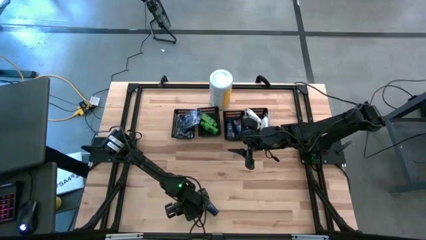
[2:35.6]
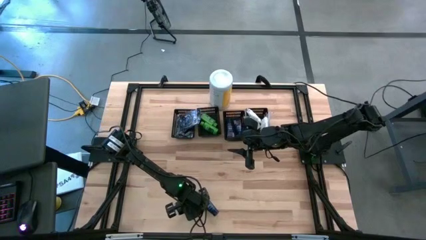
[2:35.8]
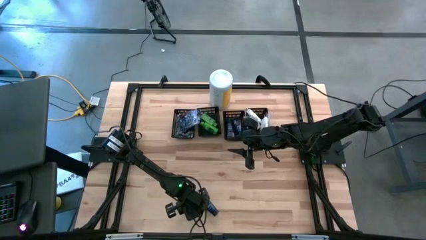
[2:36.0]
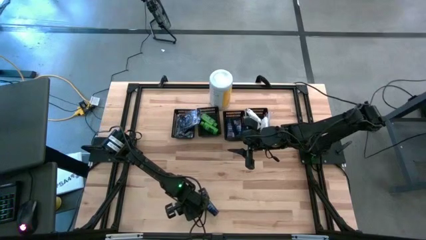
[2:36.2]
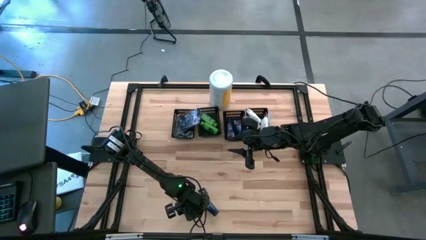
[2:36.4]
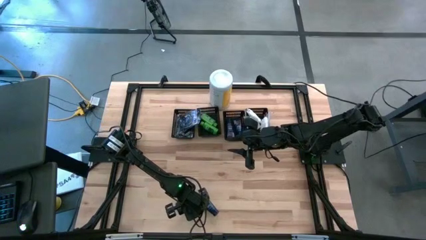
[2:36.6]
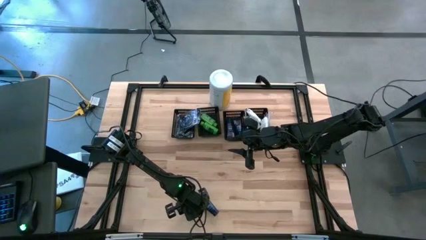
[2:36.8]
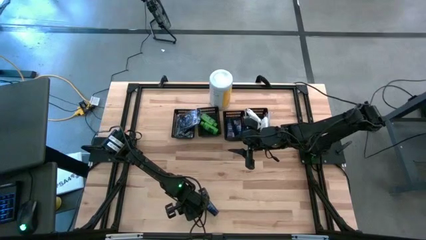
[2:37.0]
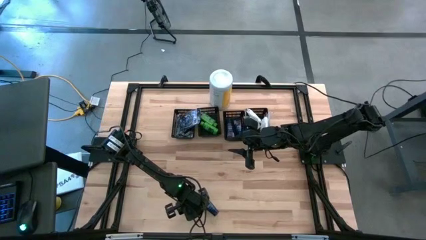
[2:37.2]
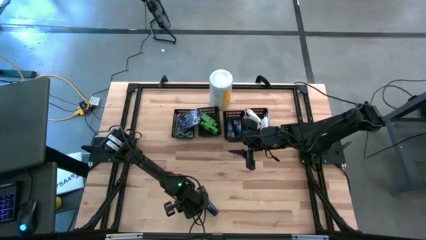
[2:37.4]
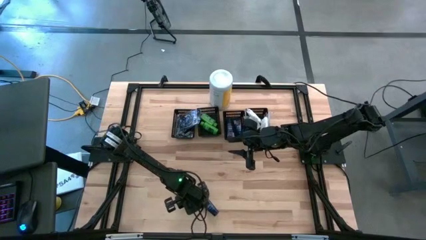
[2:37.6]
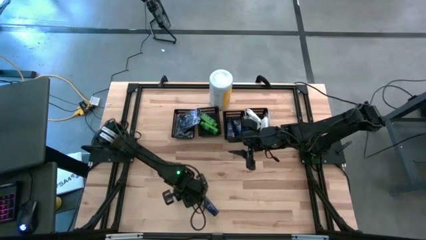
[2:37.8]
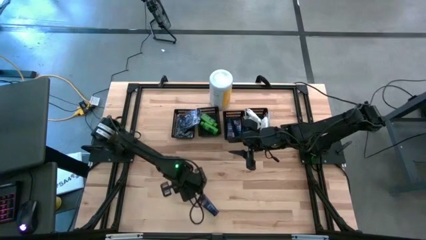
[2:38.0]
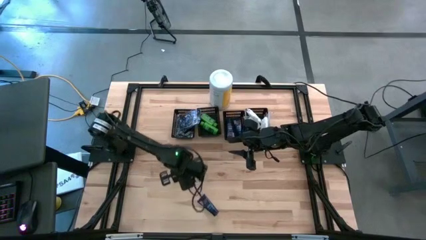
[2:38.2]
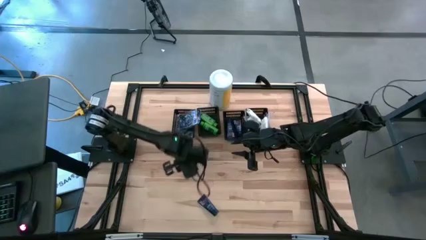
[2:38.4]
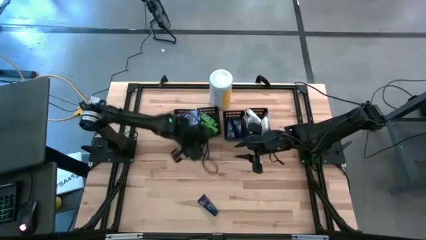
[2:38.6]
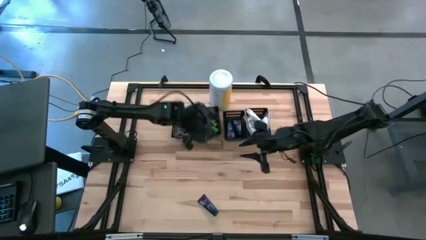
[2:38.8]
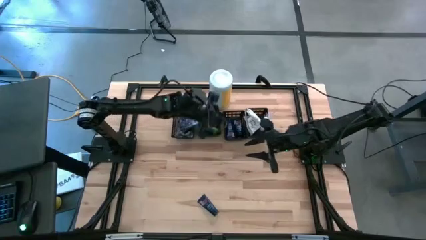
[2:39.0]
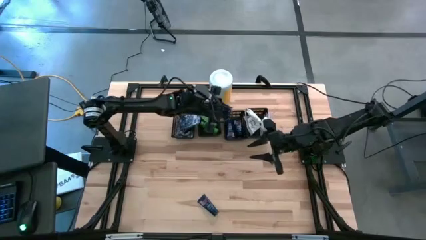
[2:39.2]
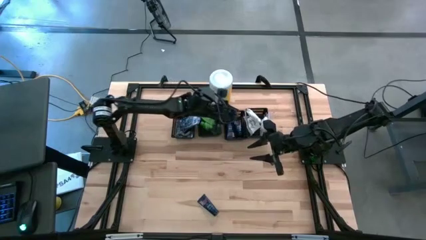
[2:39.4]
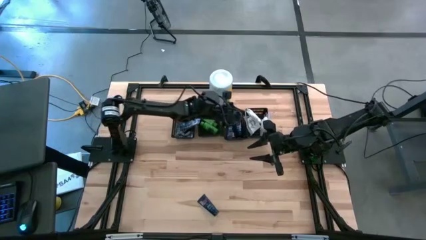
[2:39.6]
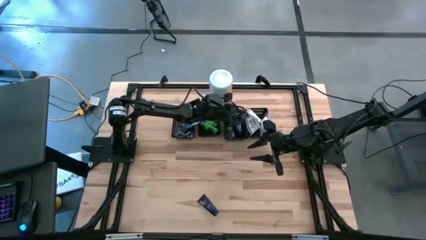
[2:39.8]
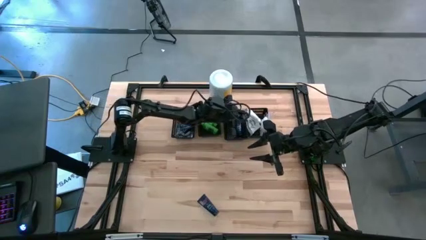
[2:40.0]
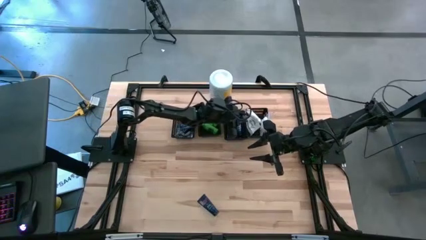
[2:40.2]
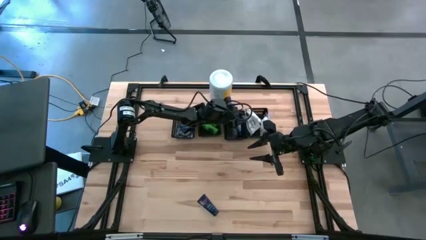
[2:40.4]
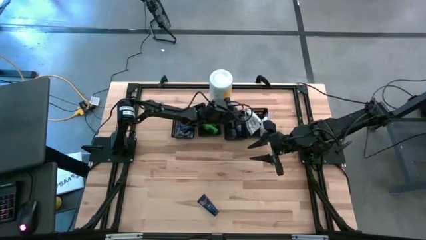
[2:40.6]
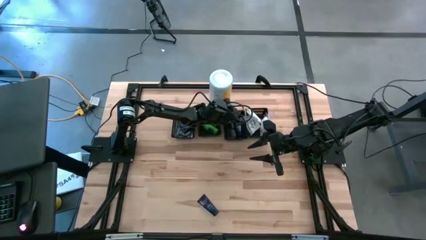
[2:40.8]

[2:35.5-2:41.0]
Task: Pick & Place Travel size toiletries
Put the left shave cream into the middle right black bin

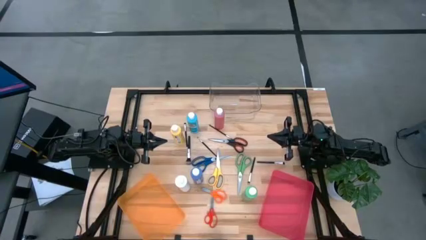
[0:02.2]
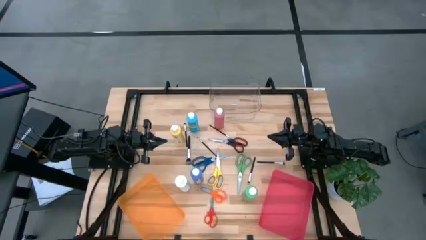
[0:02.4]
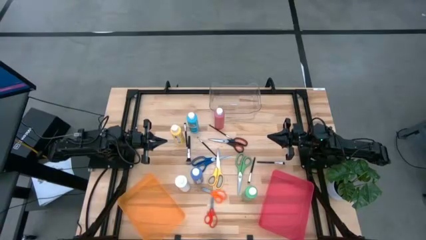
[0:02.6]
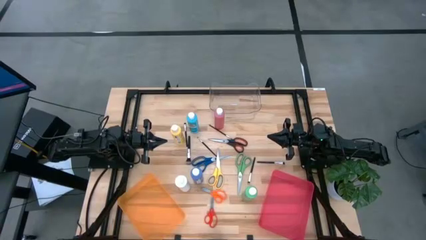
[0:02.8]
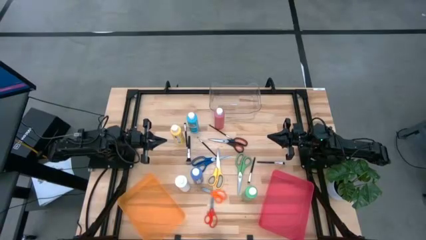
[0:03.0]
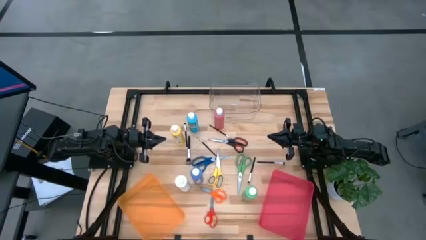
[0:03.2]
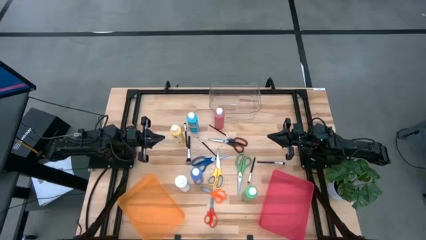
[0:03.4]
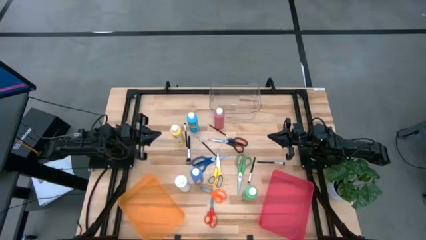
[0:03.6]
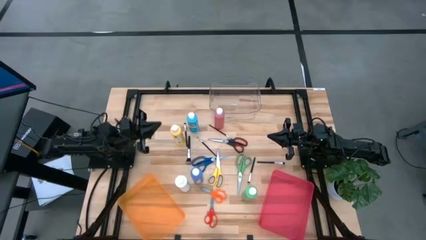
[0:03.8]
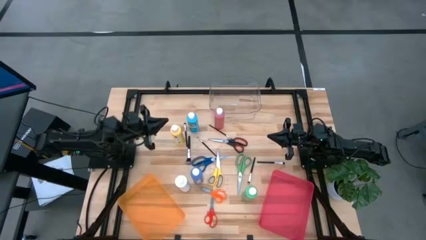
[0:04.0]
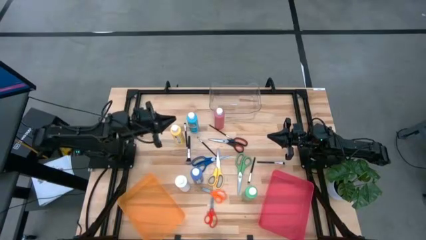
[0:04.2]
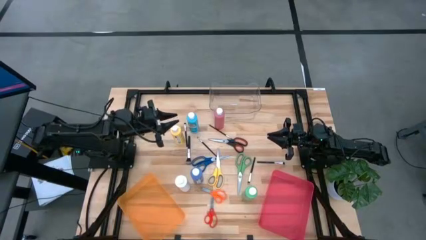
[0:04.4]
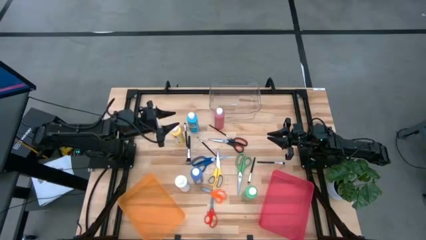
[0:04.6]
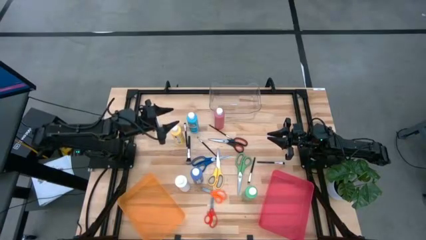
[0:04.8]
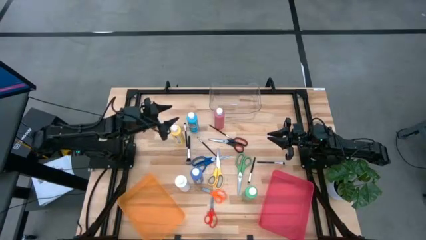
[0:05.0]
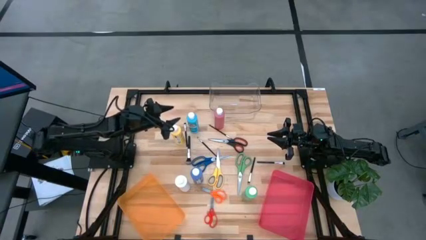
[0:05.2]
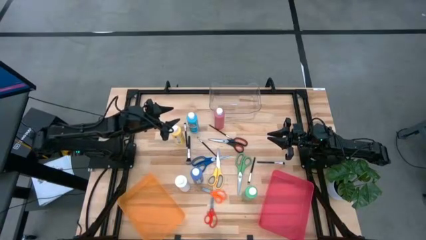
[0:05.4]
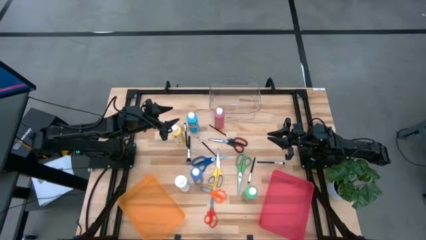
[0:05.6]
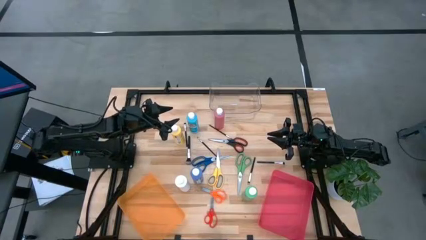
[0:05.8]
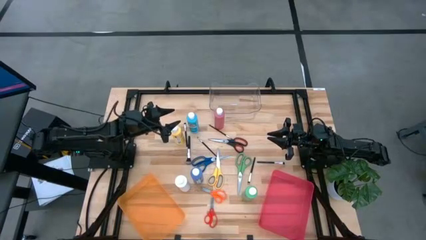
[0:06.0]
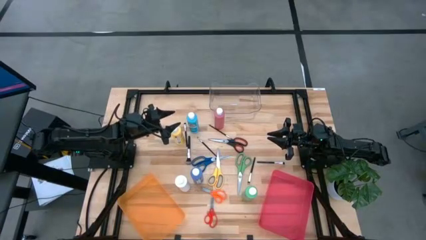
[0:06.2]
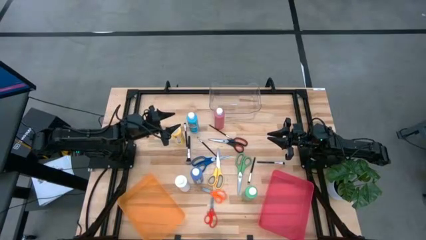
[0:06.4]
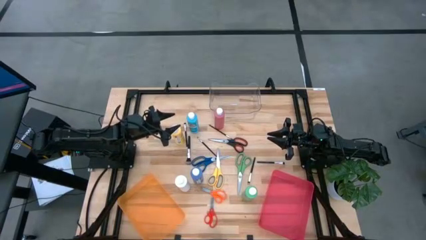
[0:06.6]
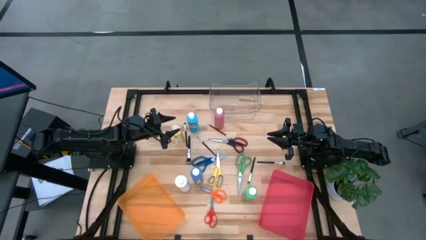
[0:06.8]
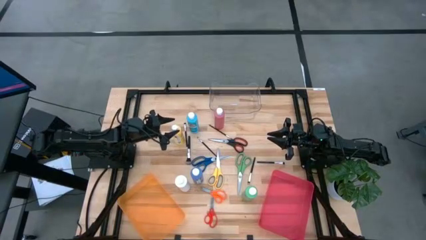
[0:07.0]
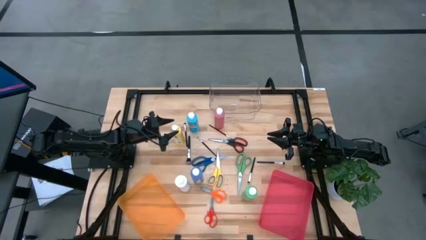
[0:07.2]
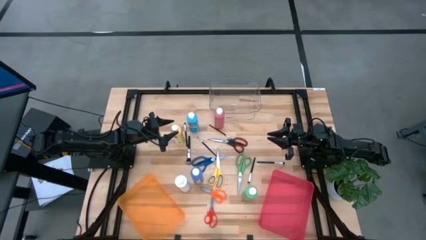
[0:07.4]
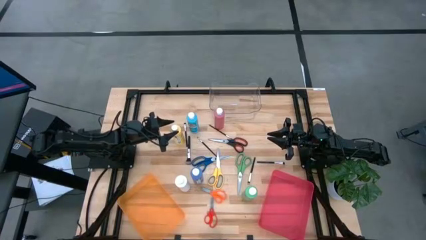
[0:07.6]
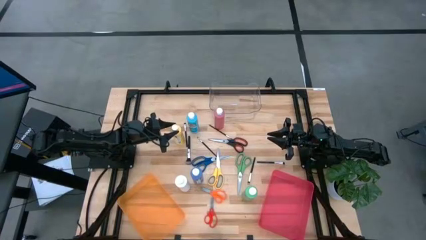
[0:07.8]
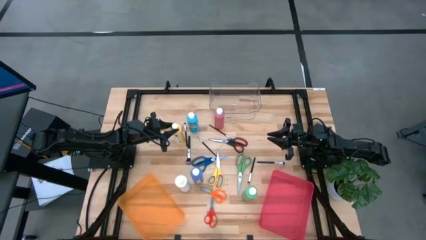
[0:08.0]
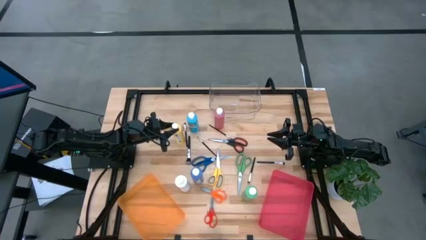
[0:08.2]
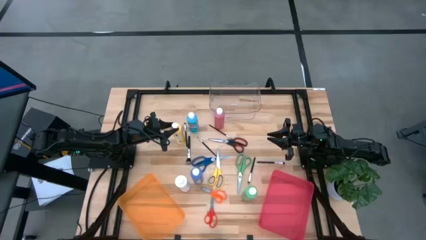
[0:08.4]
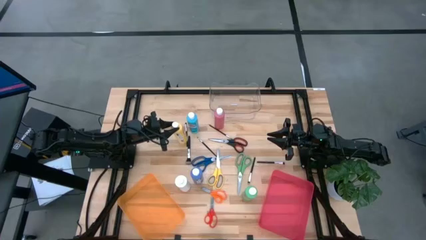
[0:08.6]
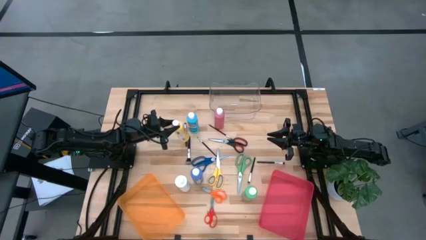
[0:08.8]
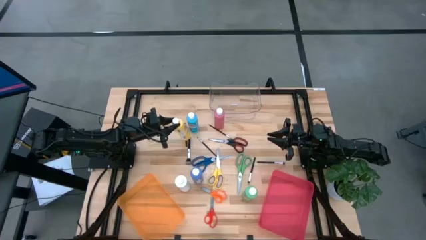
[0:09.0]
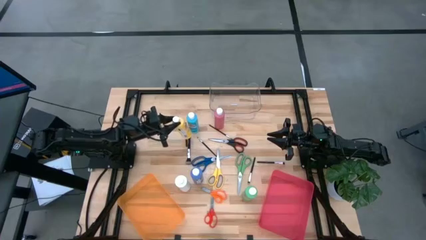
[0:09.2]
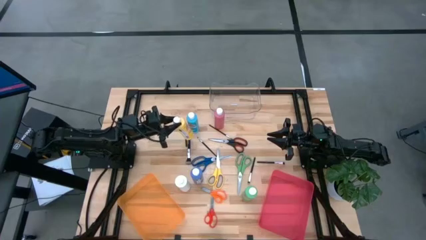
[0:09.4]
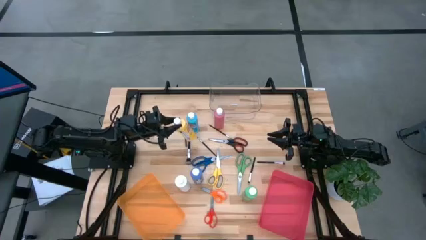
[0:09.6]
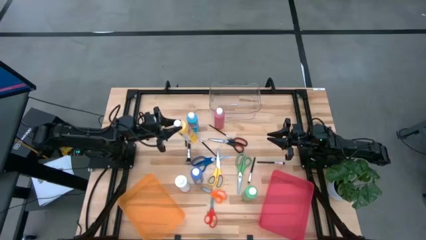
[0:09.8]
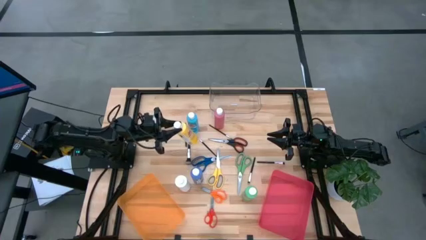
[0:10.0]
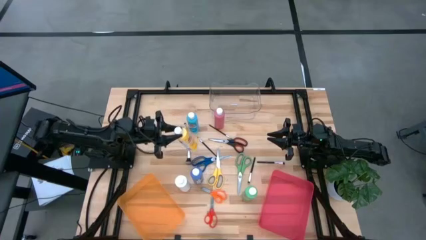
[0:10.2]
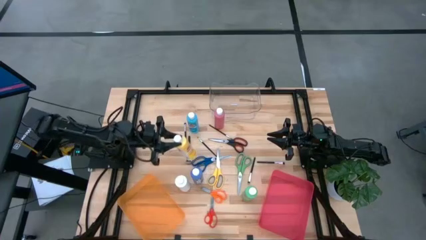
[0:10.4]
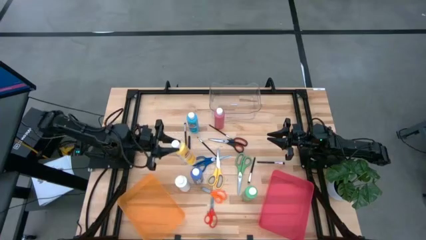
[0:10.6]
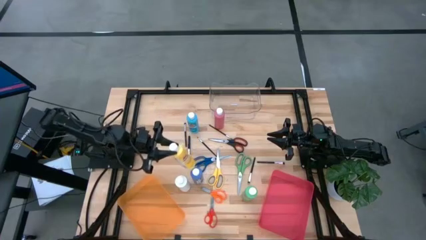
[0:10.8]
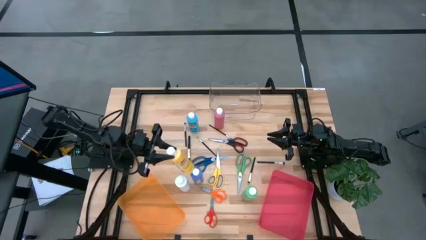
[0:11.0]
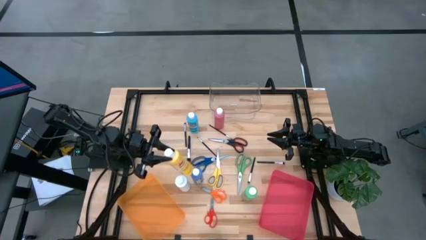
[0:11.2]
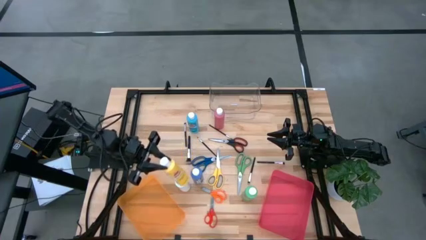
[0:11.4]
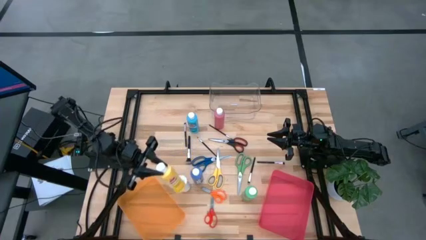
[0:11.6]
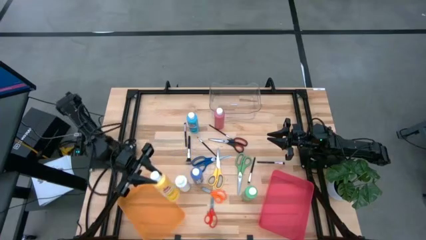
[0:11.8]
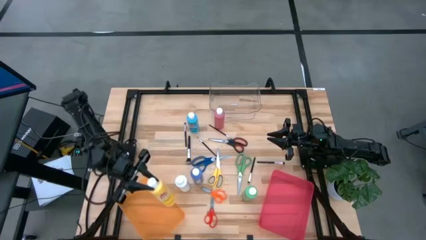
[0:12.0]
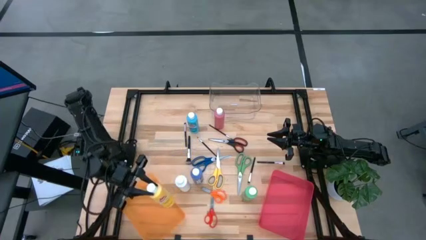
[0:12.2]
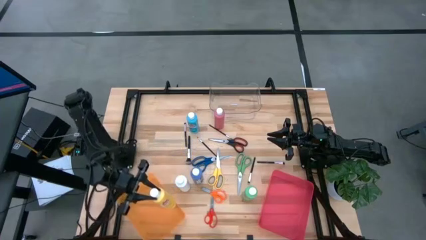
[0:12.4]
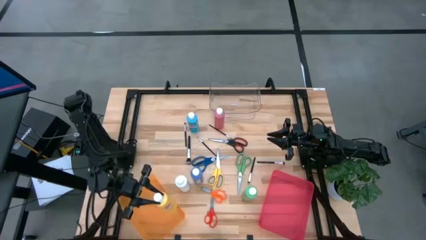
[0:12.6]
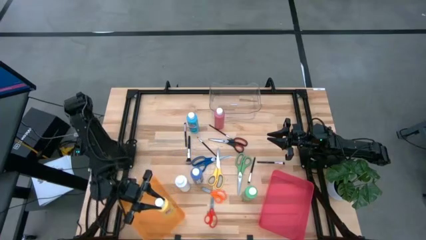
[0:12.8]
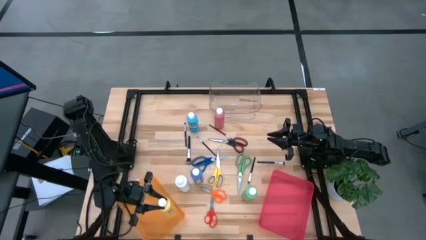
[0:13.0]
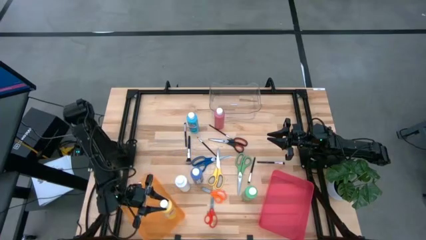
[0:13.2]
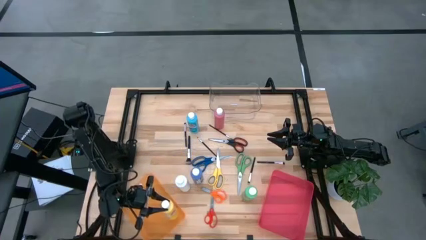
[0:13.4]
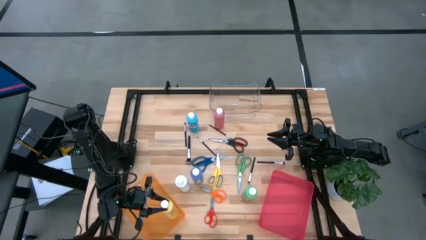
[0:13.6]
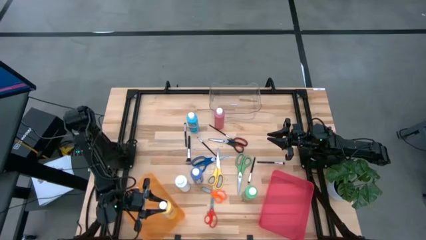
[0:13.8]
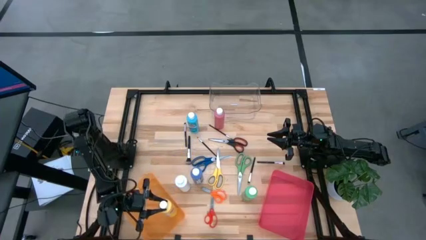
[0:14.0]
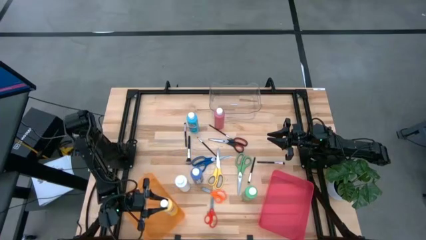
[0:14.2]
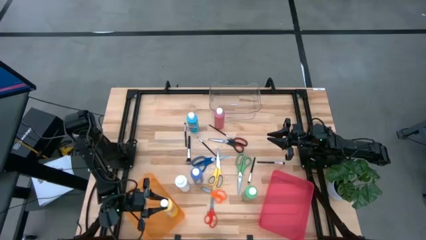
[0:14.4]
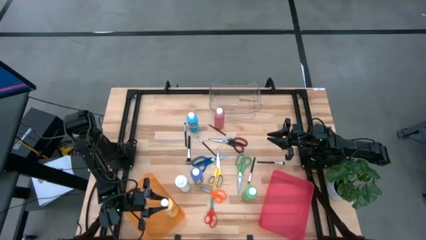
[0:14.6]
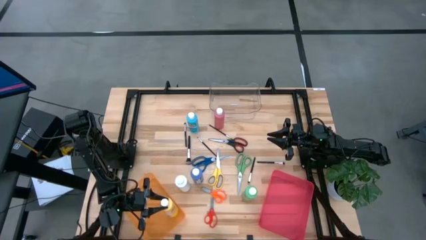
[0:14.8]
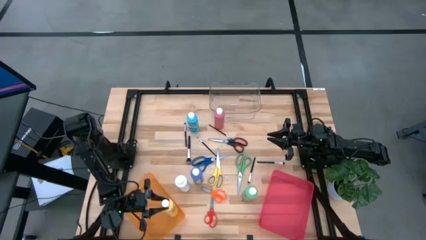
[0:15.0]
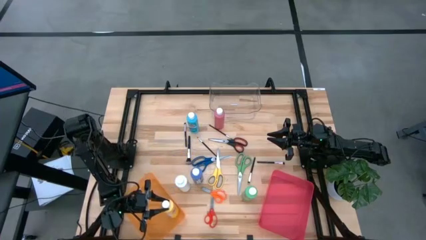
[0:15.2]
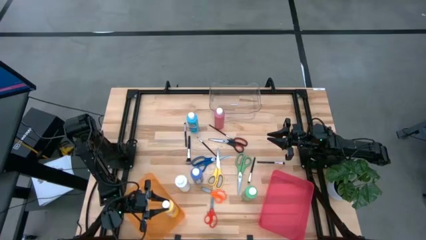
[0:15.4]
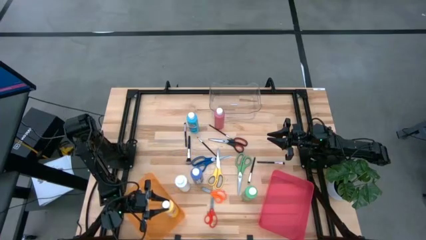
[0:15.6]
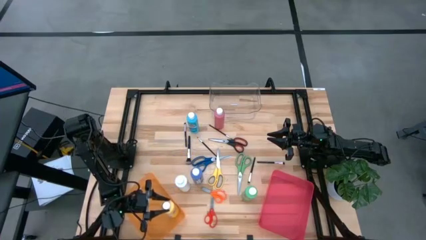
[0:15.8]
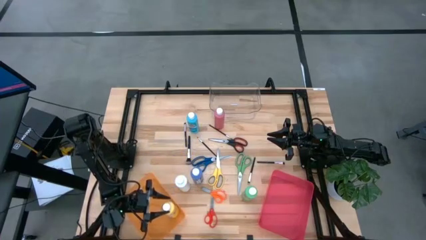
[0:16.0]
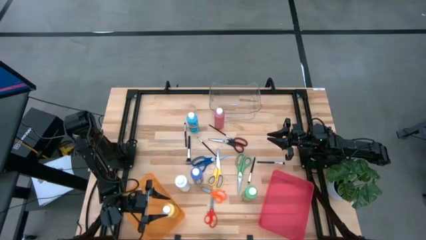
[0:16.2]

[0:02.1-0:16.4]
Task: Pick & Place Paint Supplies
Put the yellow paint bottle into the orange bin
